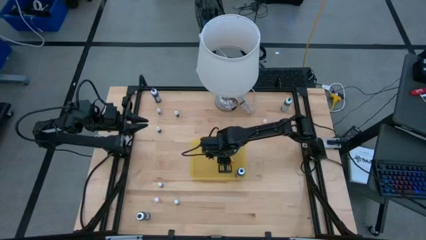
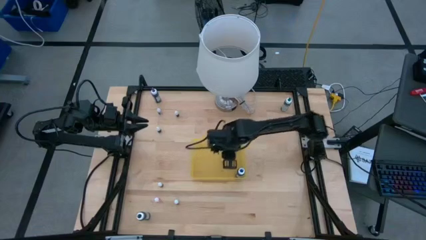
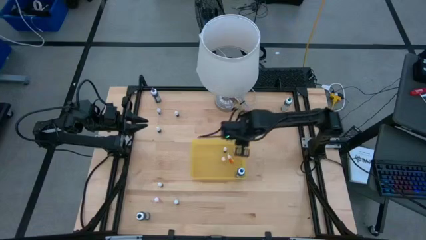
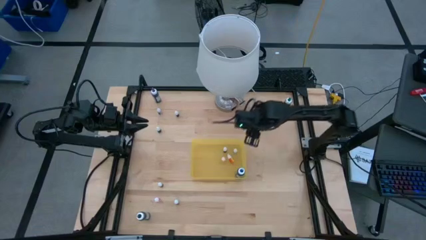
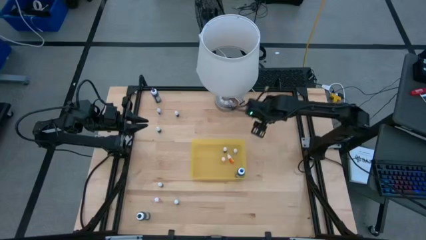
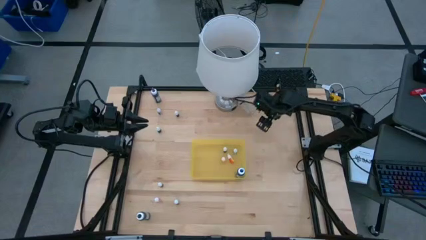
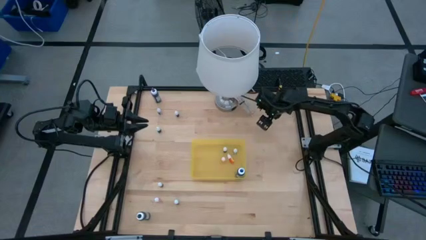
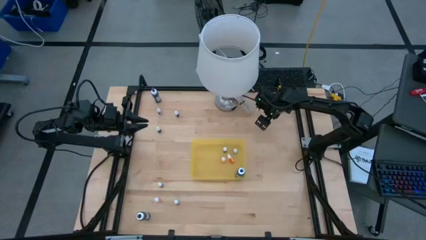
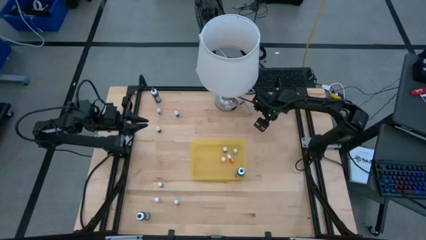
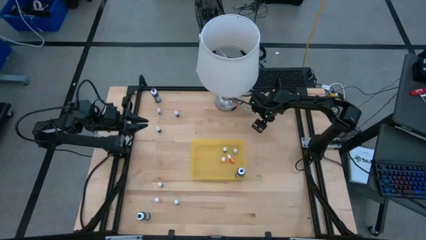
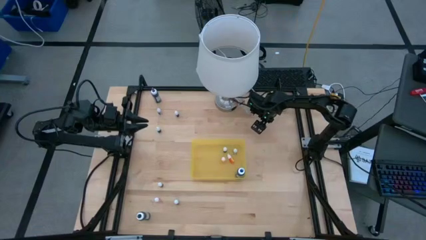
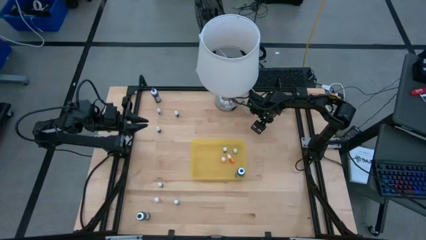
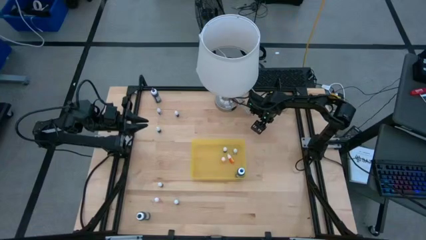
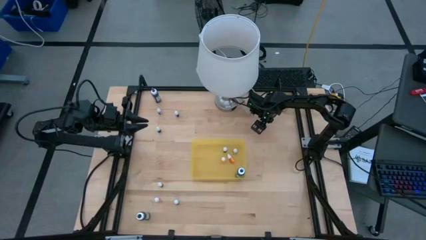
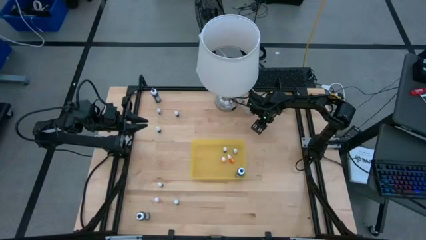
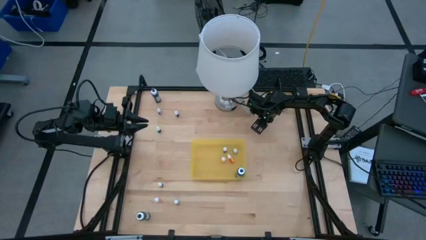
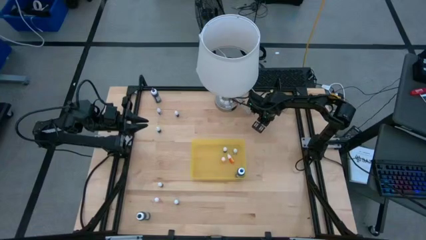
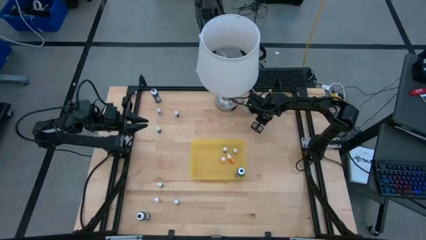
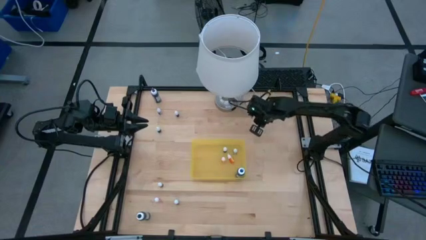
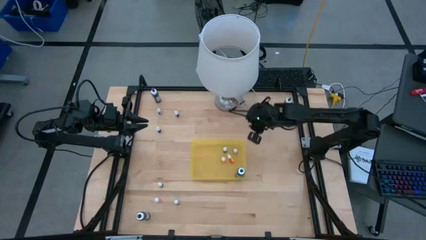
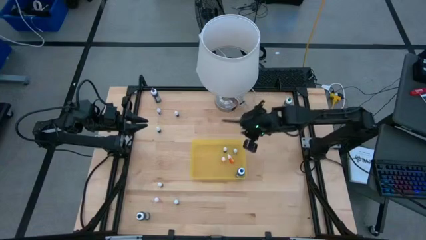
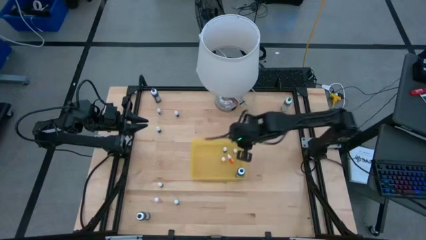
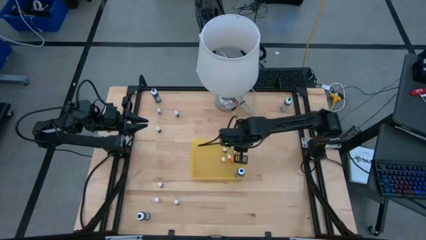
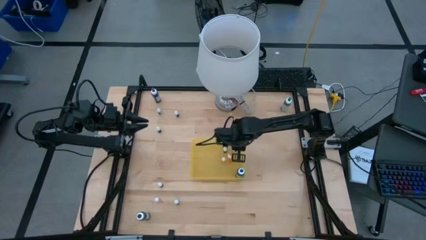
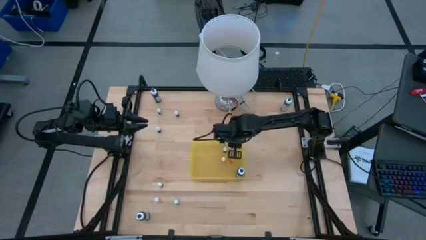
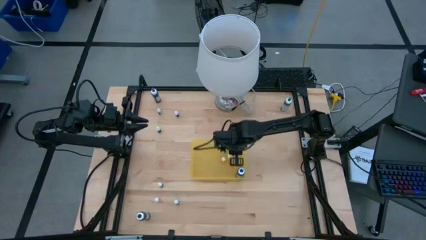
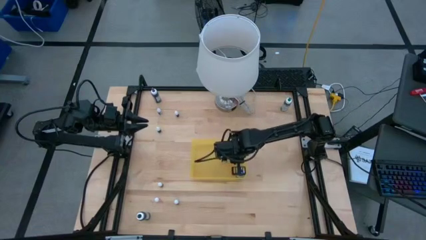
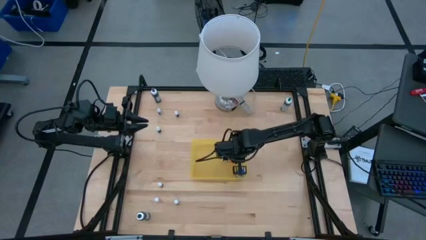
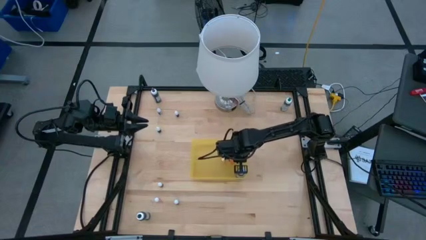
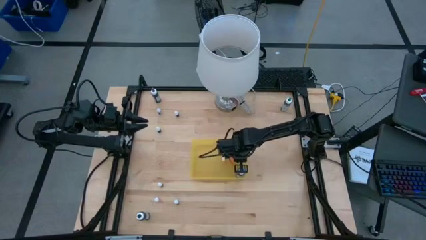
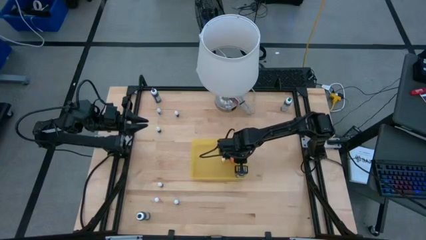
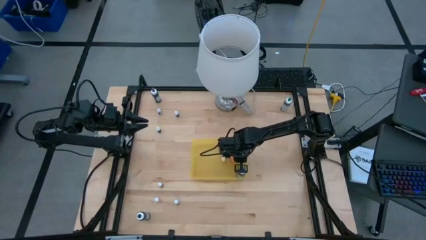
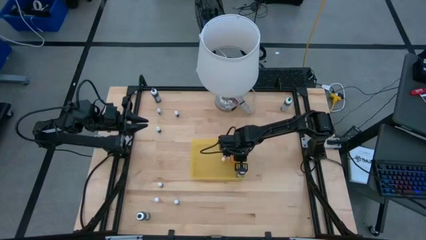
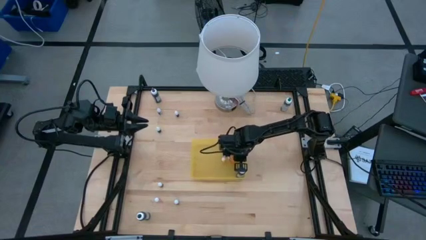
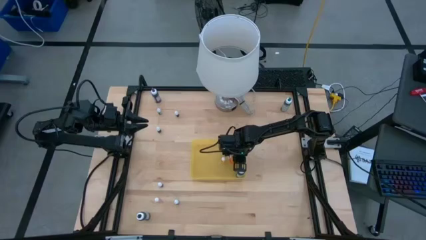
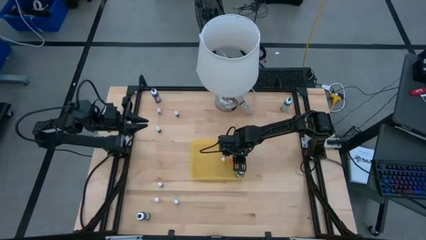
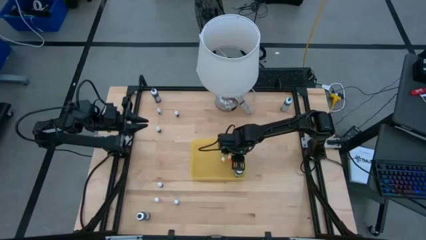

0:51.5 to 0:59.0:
Task: Pick & Place food coloring
Put the yellow food coloring bottle into the yellow bin

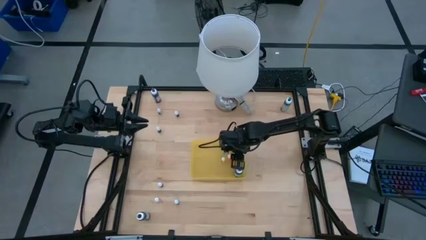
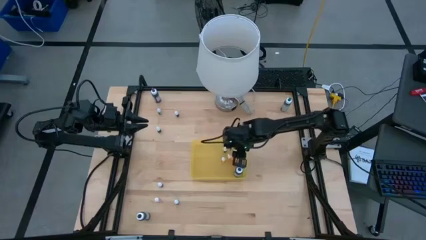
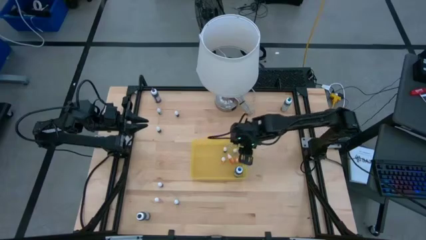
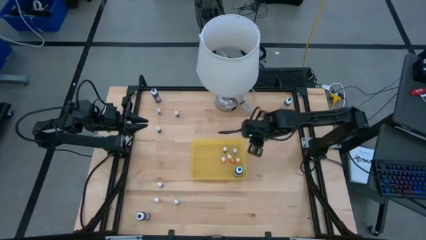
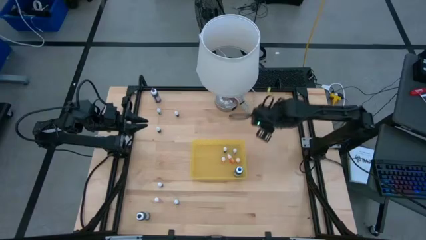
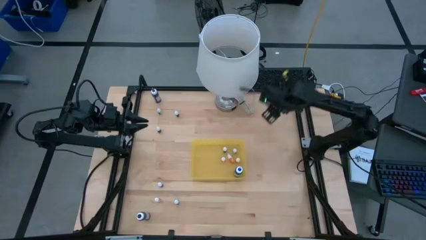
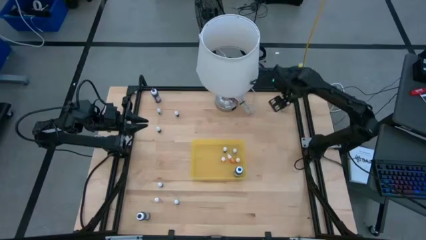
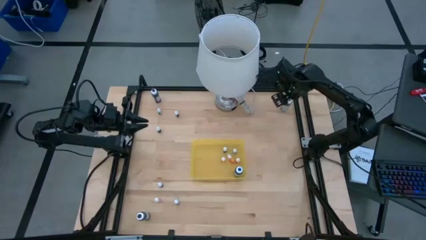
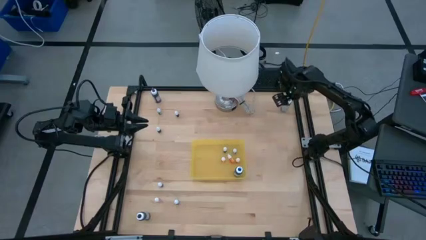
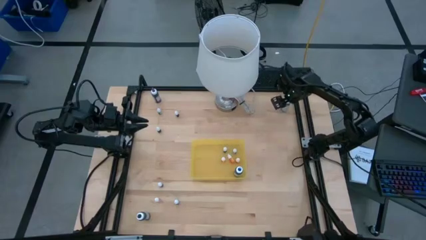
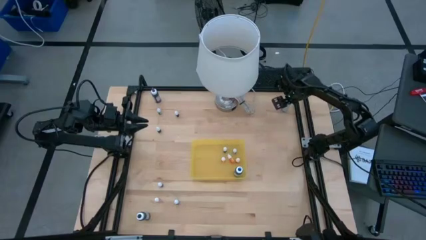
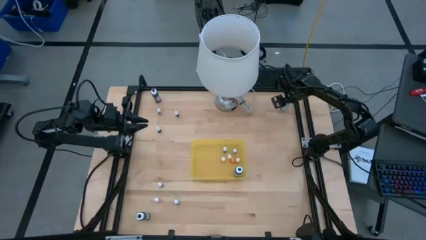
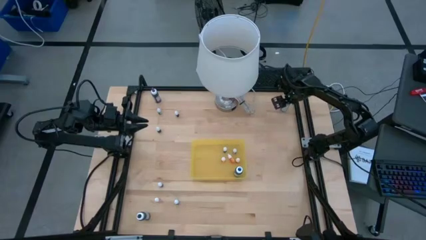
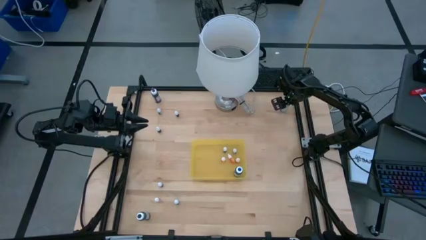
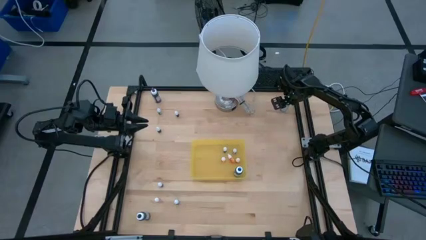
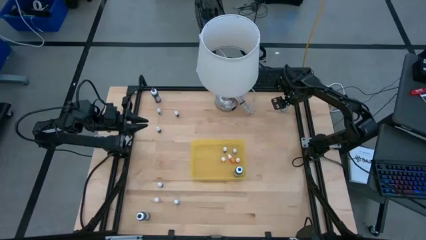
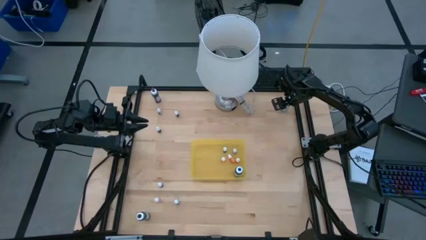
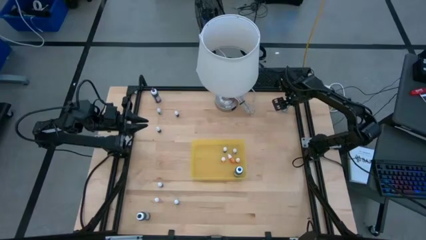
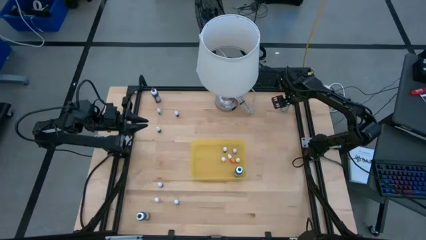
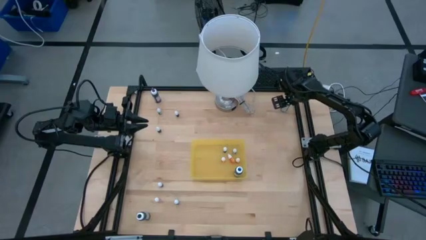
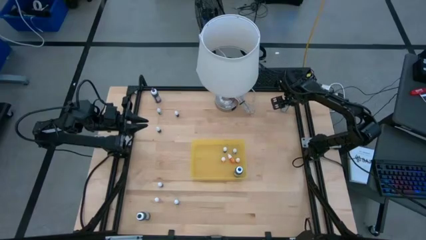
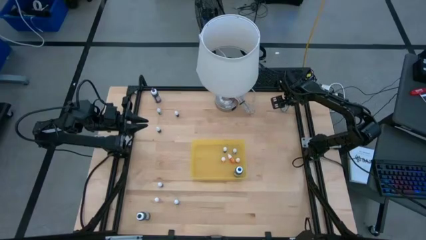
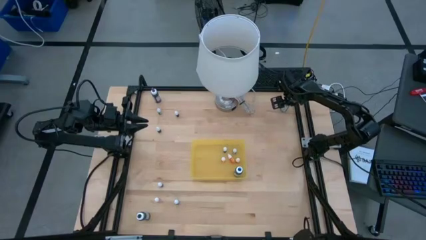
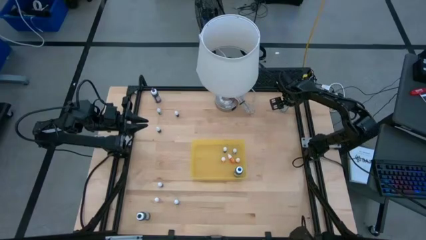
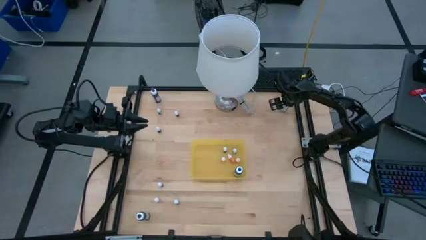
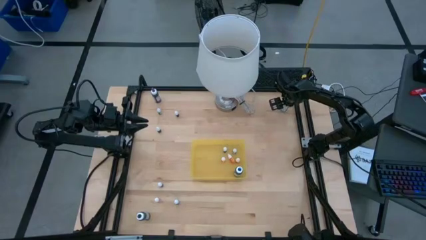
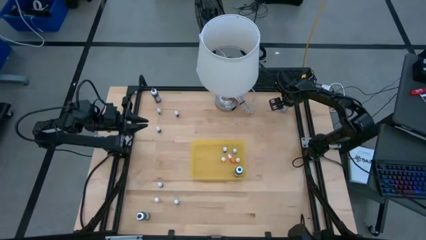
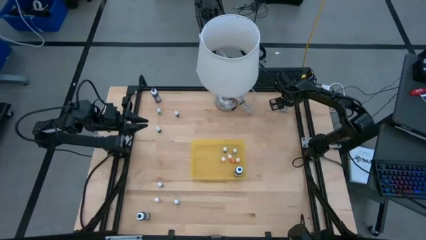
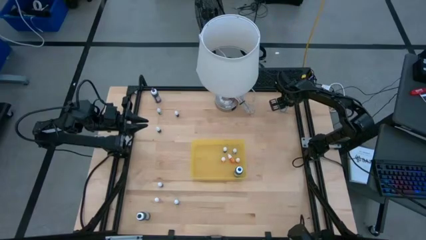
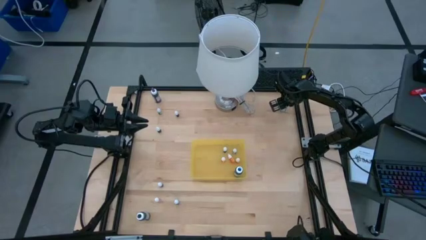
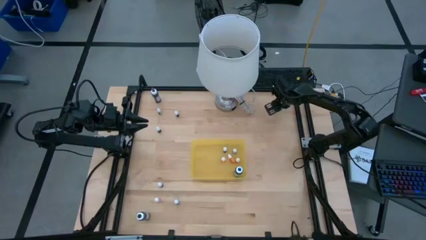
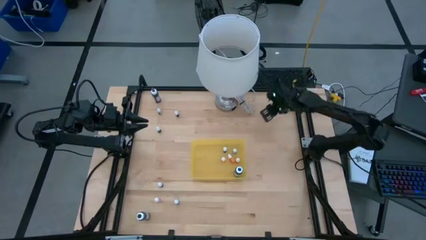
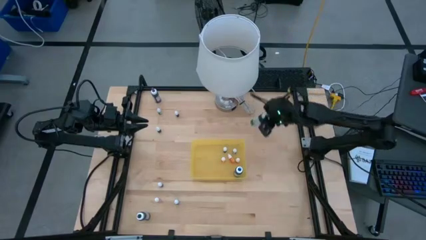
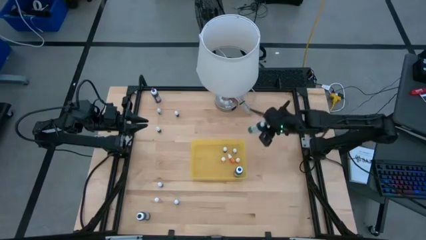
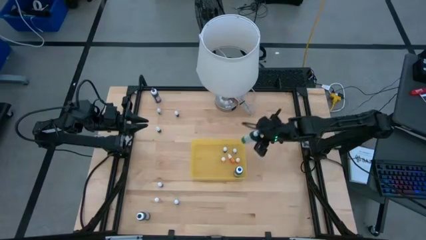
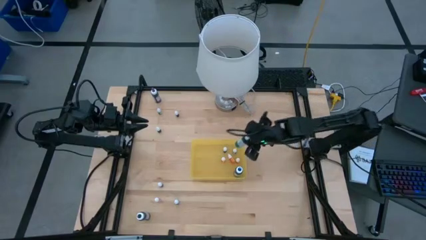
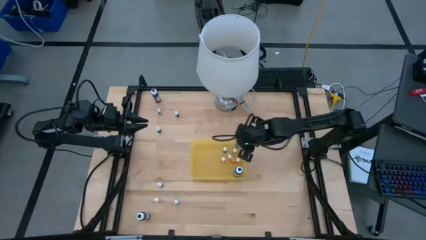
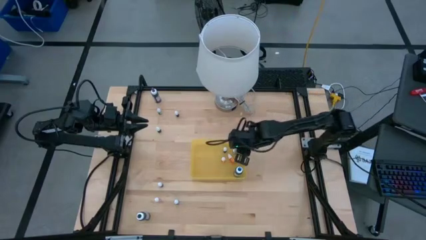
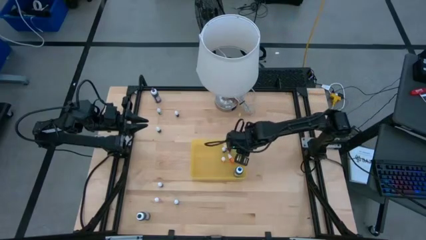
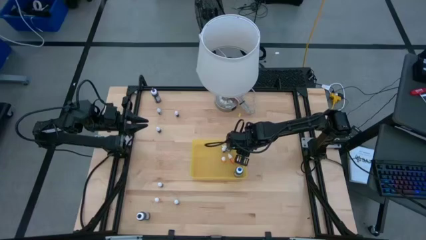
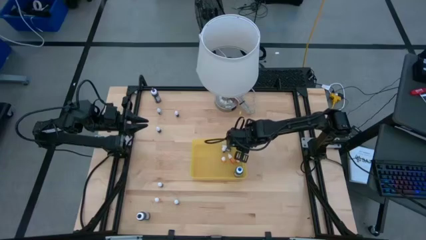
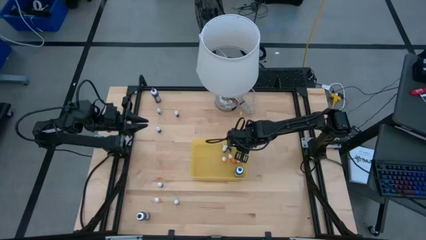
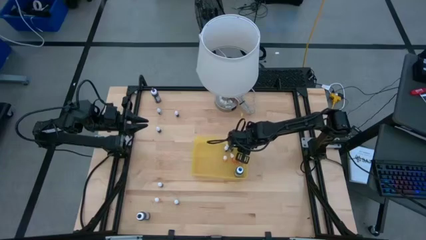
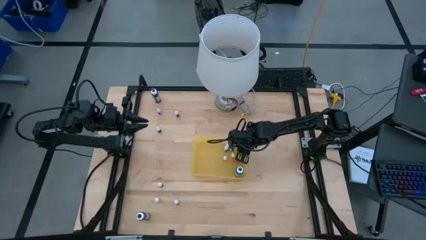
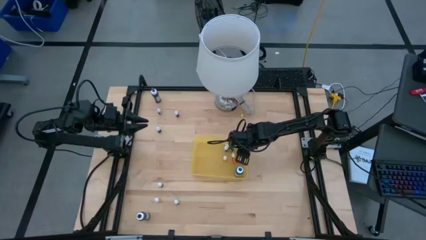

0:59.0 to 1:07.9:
Put the green food coloring bottle into the yellow bin
